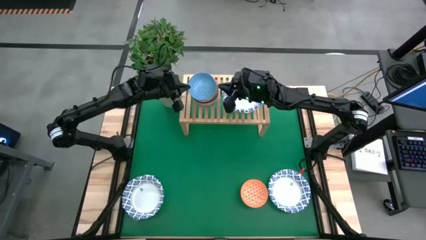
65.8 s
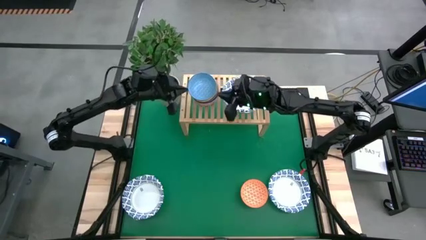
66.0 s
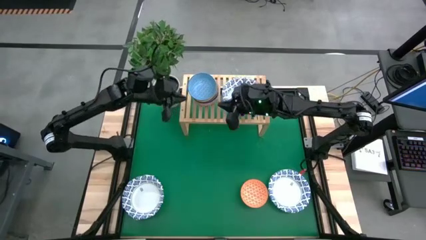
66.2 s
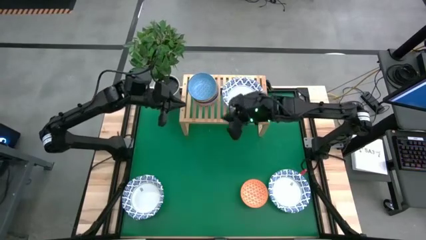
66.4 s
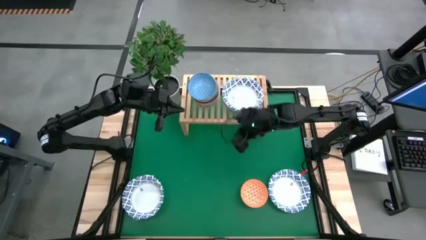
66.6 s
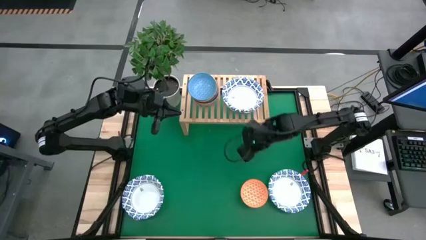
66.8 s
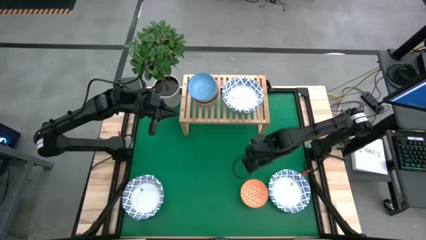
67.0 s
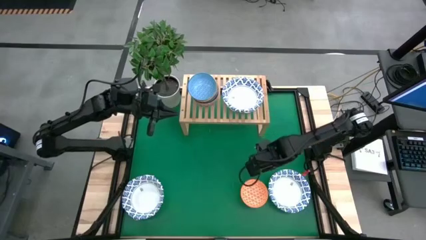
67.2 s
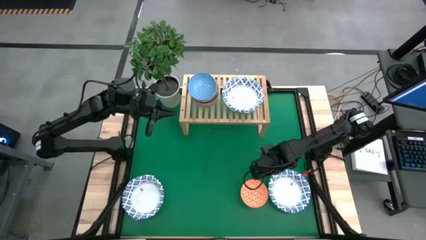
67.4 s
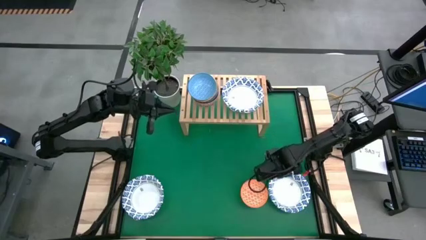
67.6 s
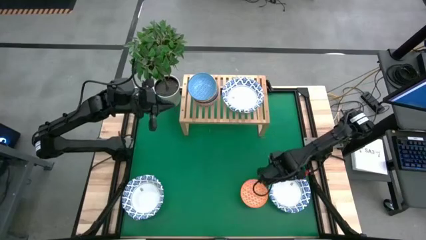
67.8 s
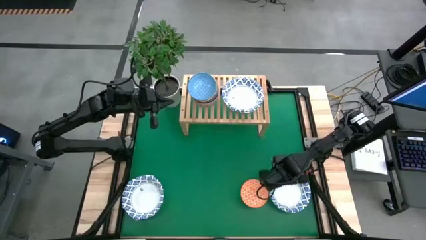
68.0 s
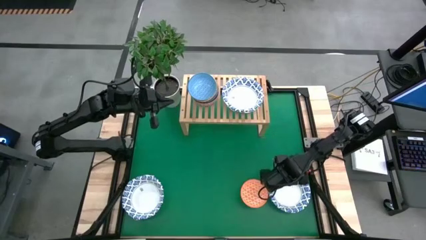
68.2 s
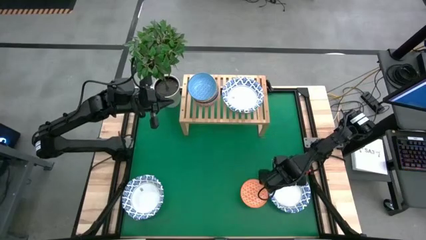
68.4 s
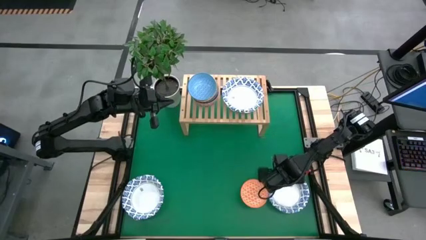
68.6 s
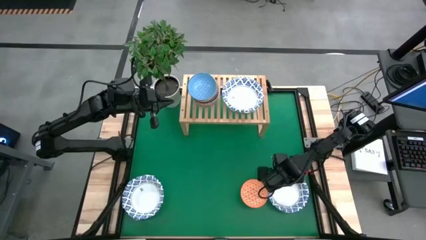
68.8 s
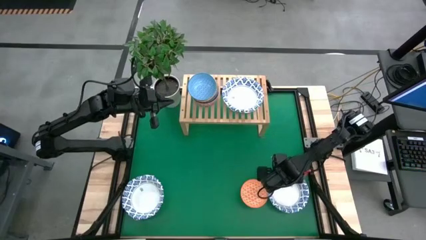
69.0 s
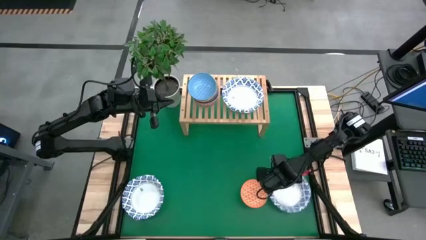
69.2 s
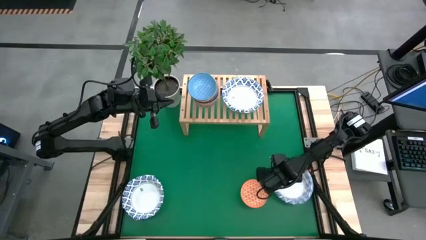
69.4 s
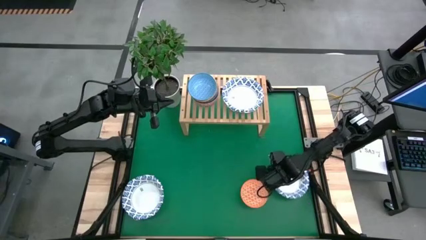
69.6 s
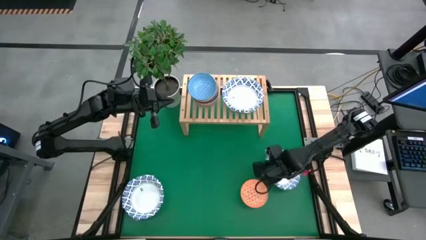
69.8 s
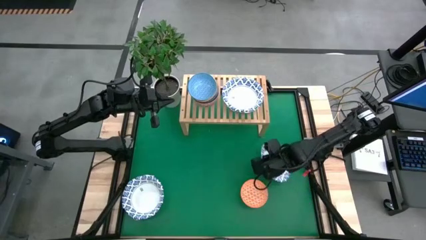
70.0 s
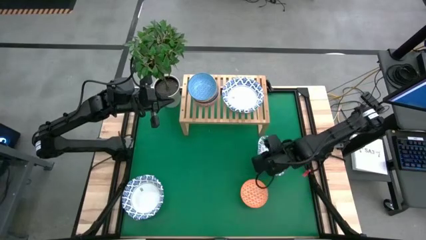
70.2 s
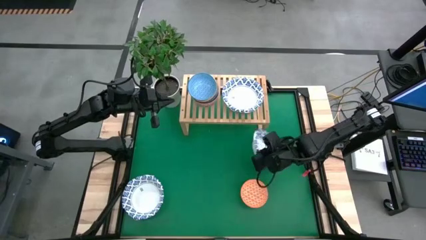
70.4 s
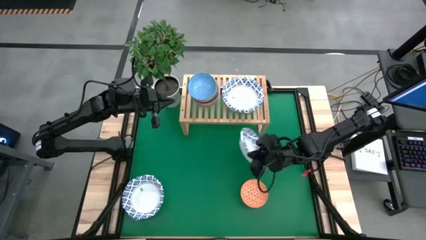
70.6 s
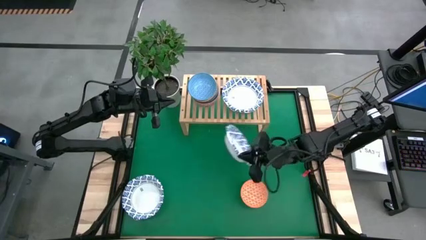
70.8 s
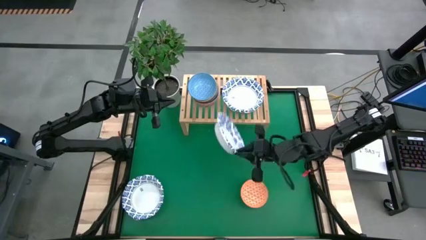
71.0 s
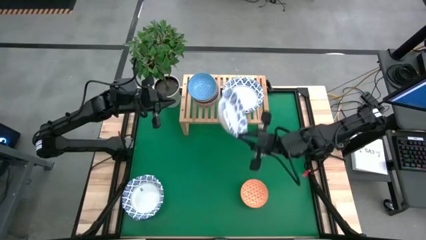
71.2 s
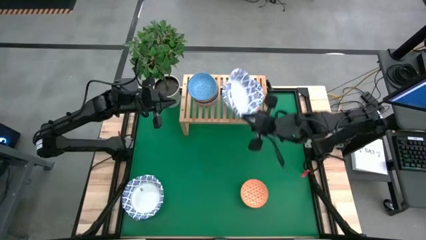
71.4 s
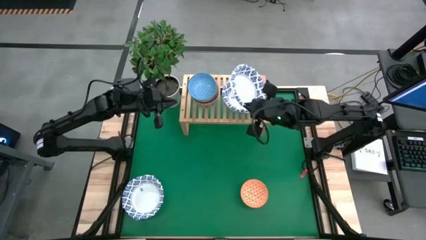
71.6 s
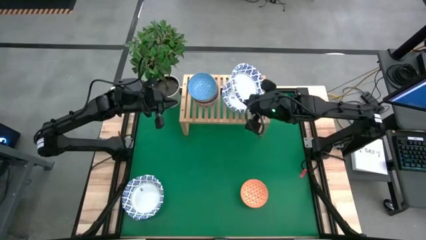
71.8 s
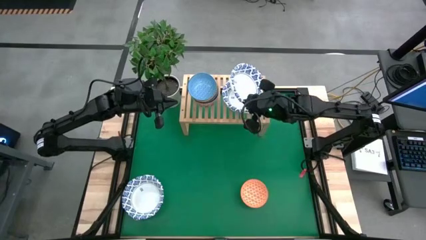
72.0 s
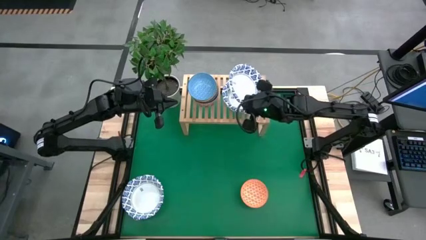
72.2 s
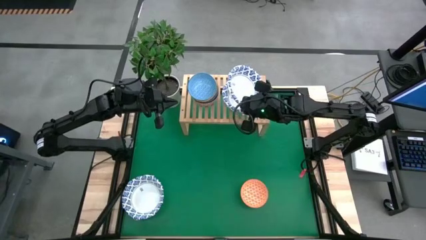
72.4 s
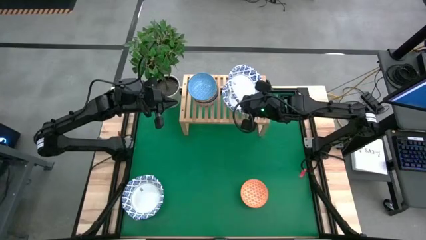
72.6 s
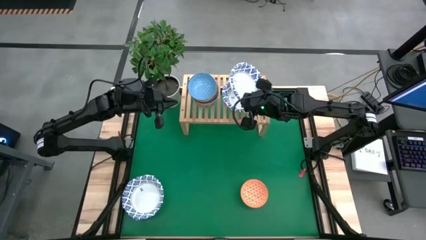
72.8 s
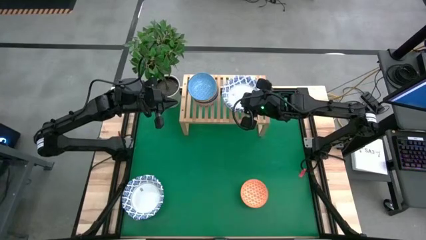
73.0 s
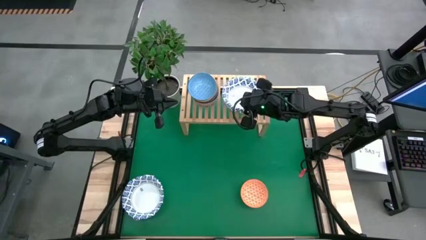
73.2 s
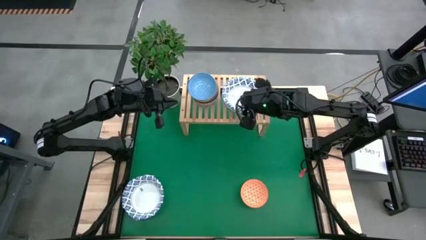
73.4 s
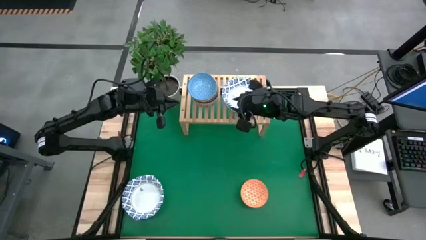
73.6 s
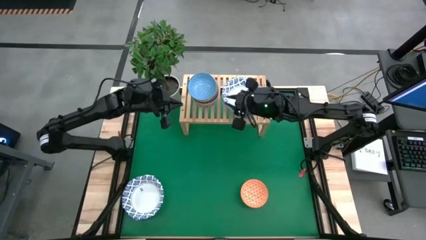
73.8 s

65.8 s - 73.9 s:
Task: Place and stack bowls onto a shelf
Stack the white bowl on top of the white bowl on the shelf

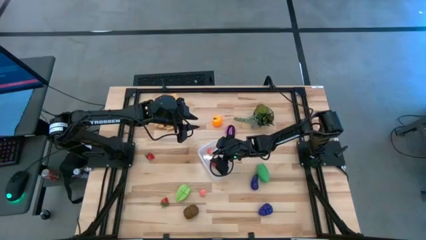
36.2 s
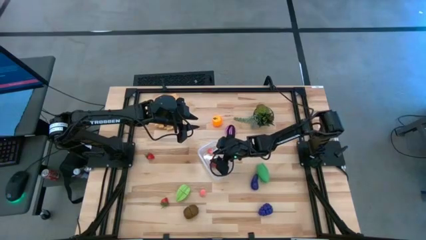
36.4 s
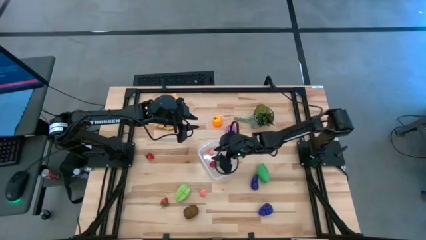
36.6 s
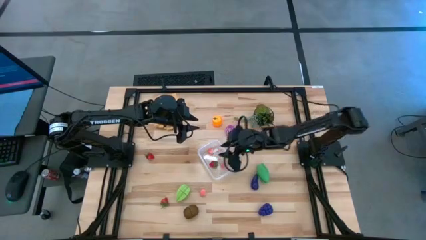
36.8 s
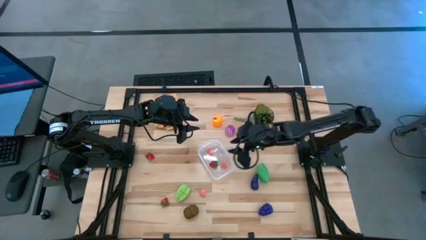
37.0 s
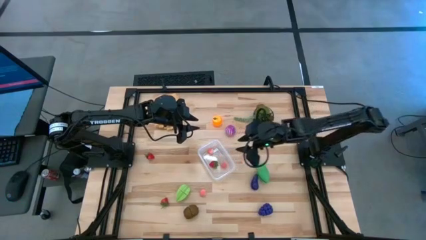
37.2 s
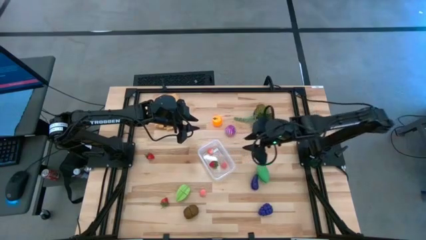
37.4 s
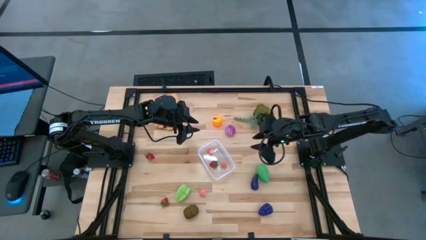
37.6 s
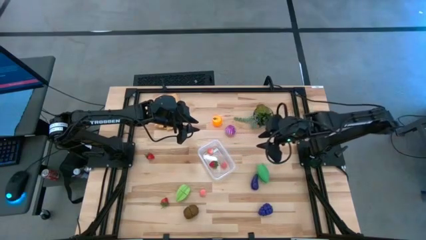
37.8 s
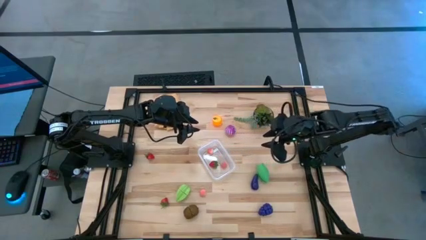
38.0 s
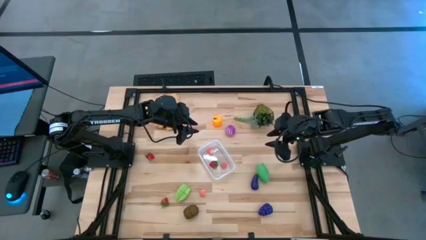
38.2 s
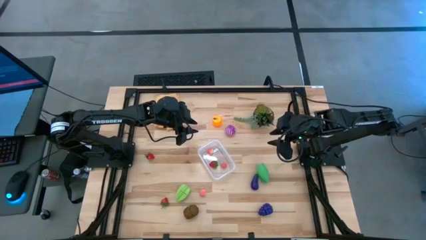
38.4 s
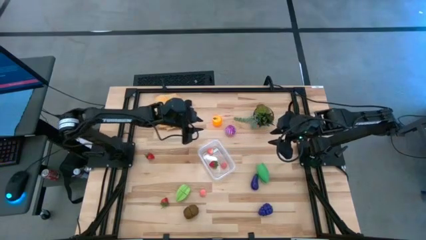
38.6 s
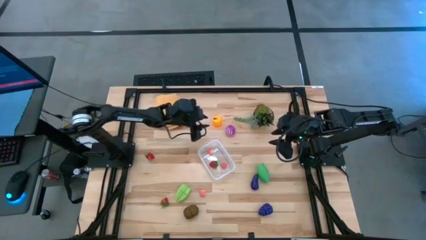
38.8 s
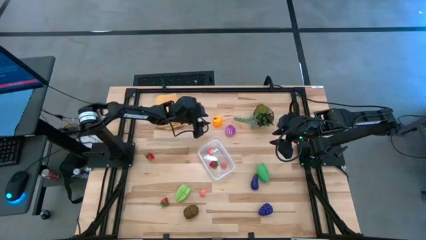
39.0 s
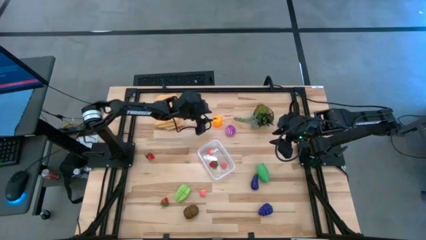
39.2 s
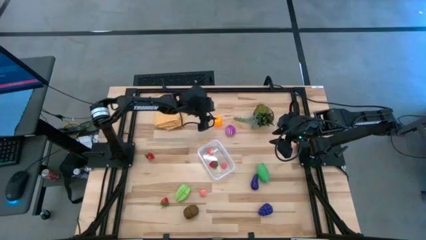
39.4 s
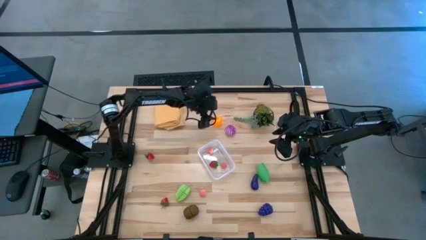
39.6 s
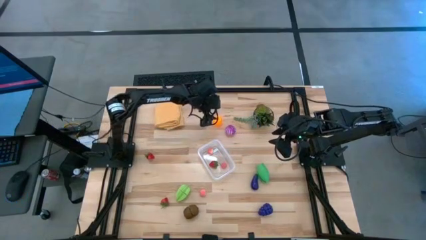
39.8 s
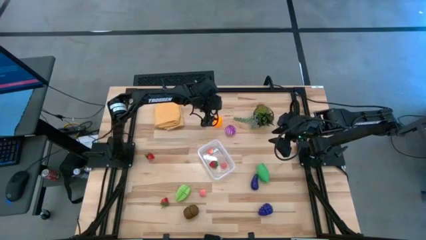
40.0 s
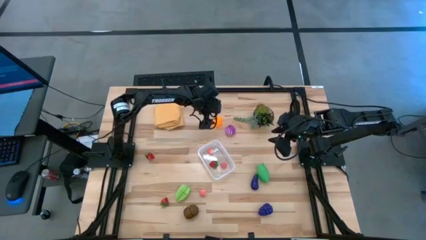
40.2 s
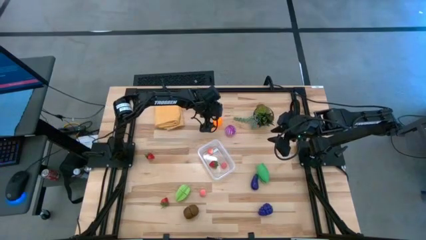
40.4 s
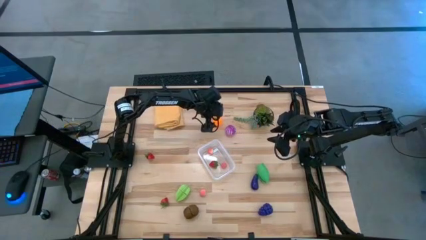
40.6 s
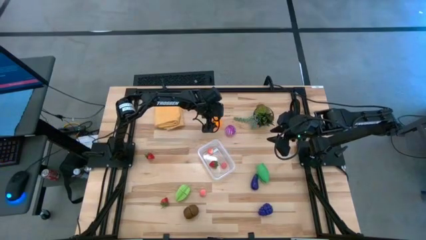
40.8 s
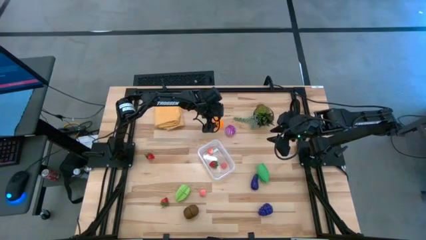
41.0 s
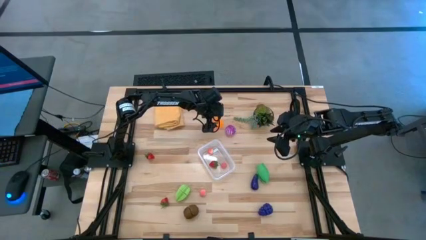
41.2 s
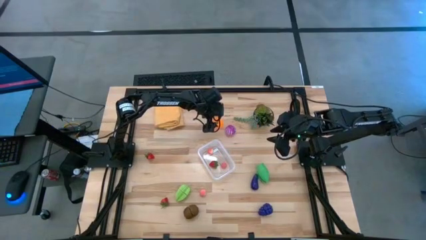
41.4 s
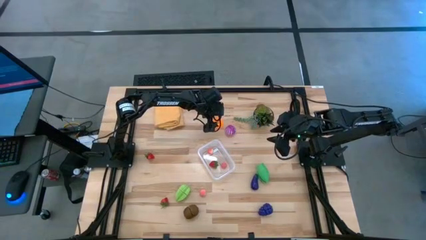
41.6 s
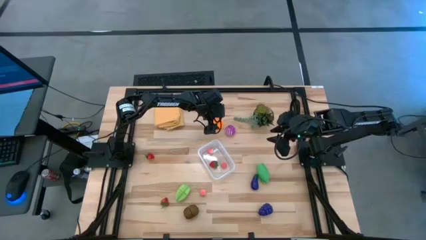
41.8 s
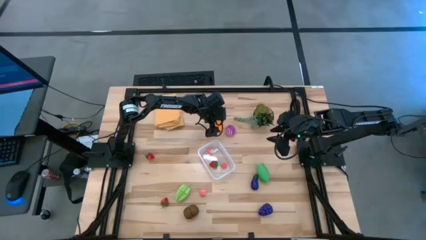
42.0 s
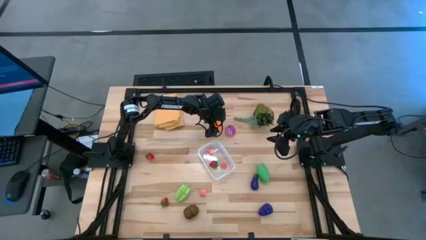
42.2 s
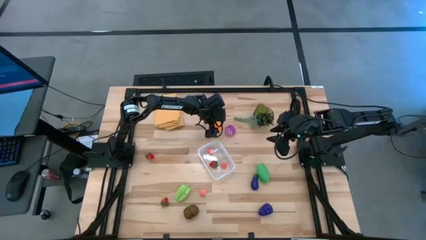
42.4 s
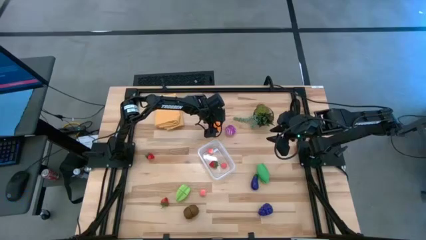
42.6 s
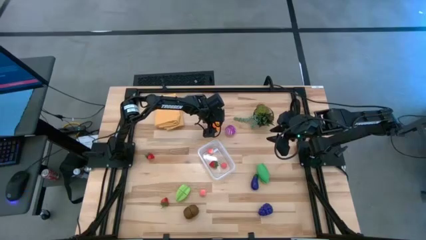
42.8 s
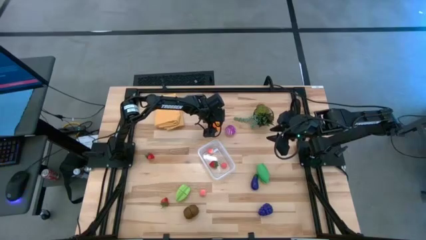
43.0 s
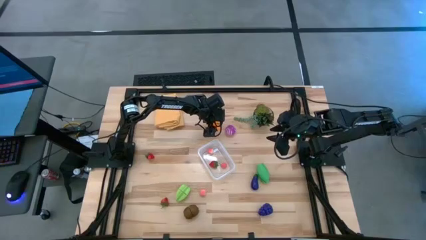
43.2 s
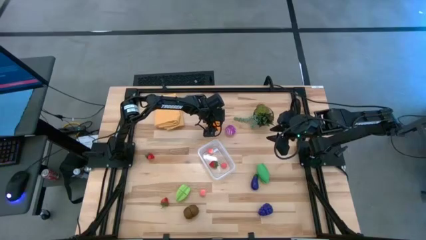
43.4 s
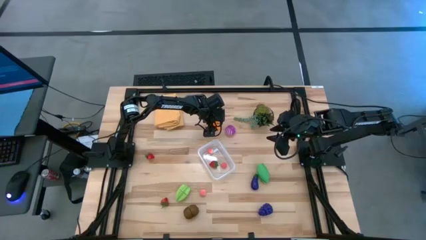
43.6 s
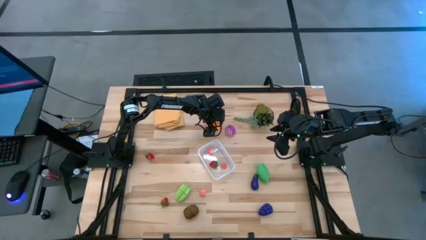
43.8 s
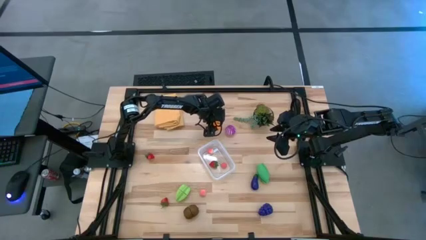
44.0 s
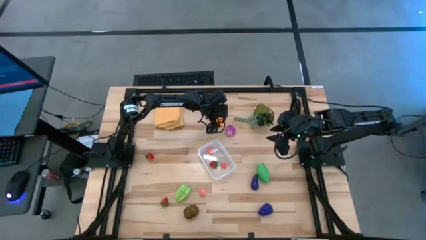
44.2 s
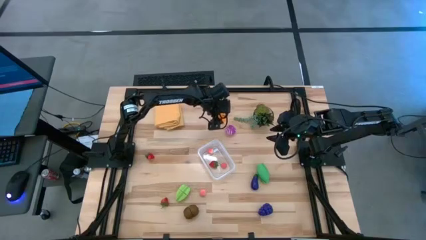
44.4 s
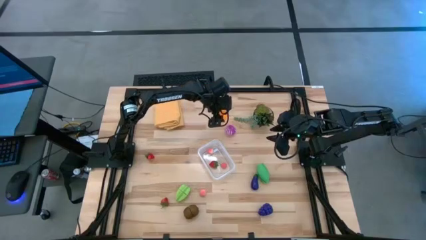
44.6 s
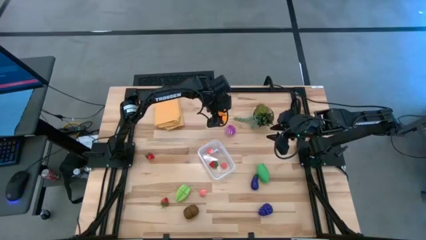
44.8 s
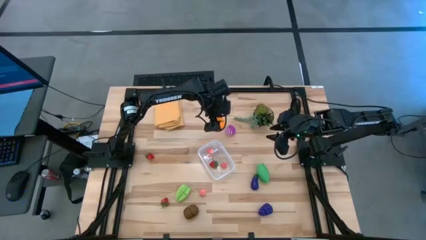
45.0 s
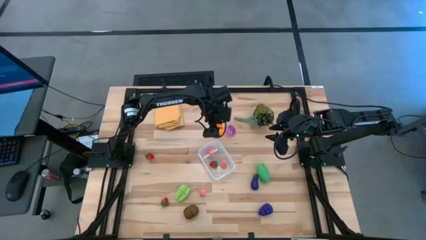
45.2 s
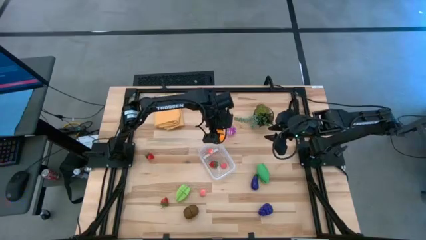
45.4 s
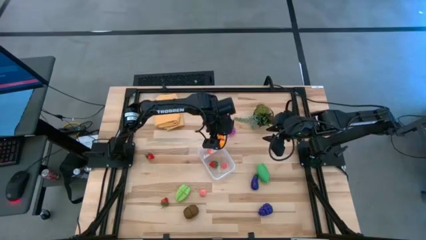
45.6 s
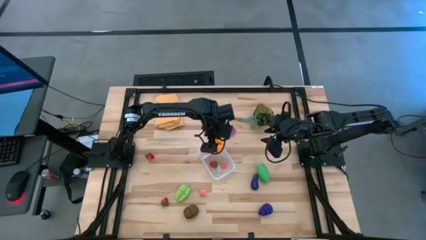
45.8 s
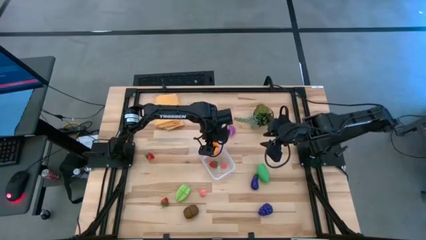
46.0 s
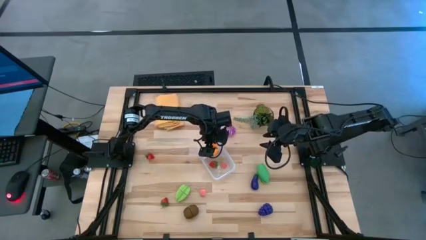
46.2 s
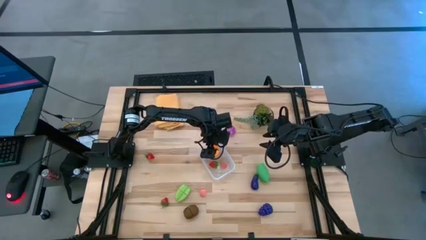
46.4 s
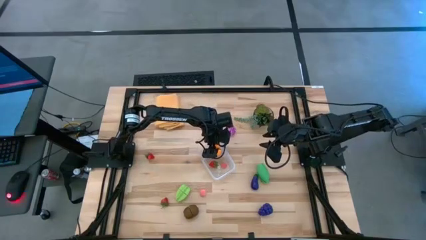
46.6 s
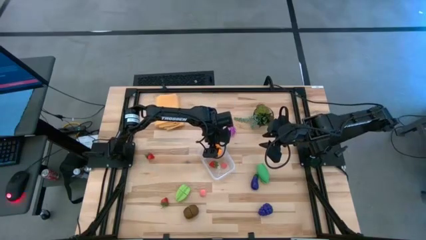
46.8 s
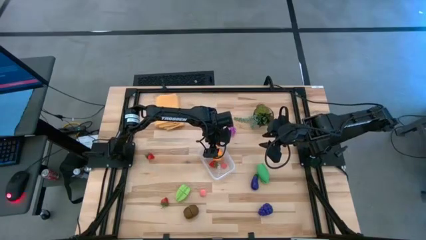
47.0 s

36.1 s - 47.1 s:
Task: Pick and placing Produce into tupperware
Put the orange into the transparent bin
